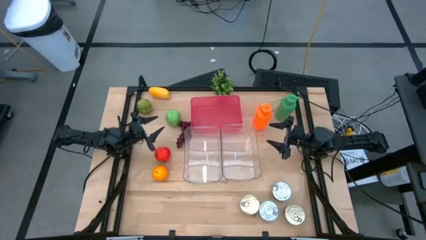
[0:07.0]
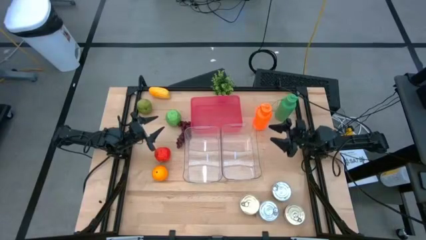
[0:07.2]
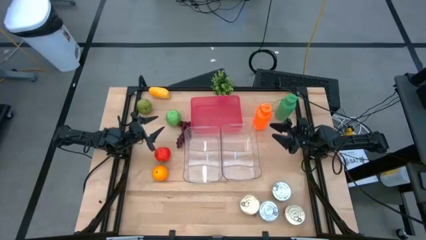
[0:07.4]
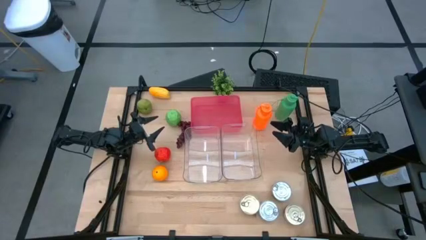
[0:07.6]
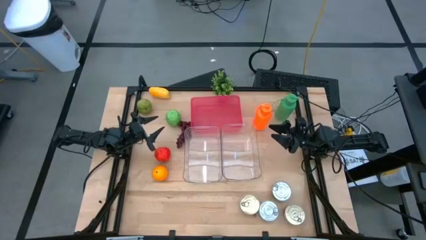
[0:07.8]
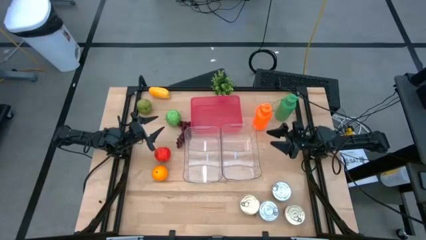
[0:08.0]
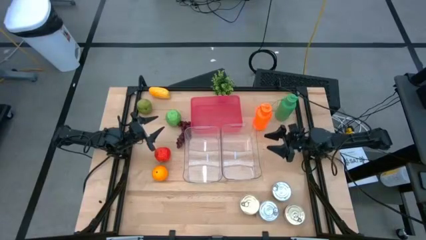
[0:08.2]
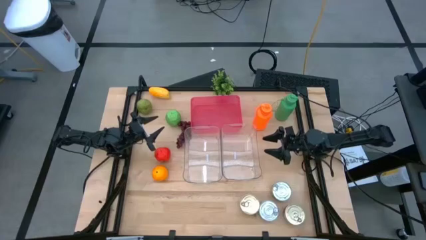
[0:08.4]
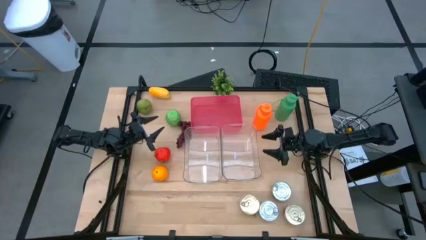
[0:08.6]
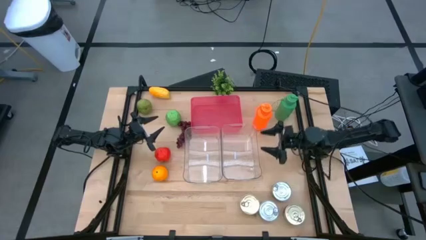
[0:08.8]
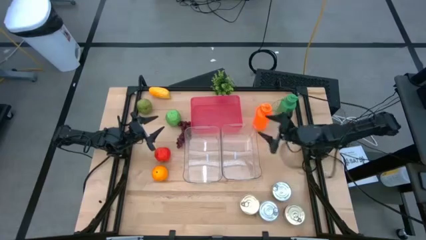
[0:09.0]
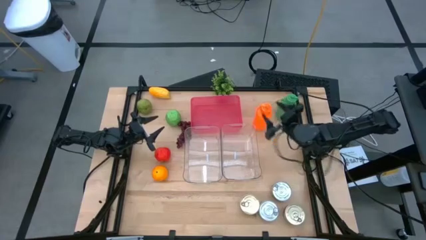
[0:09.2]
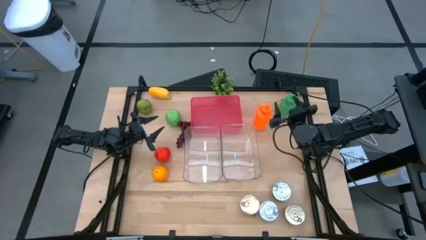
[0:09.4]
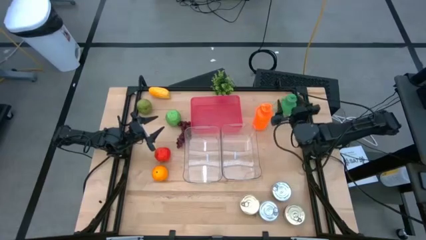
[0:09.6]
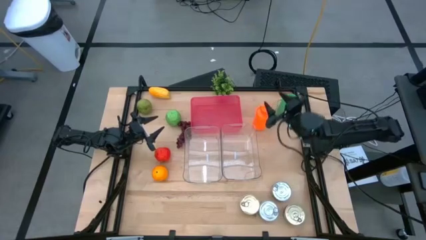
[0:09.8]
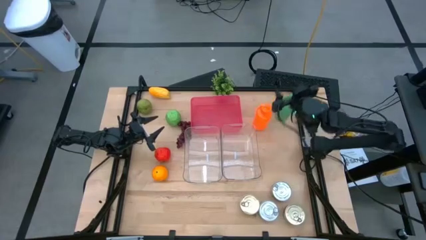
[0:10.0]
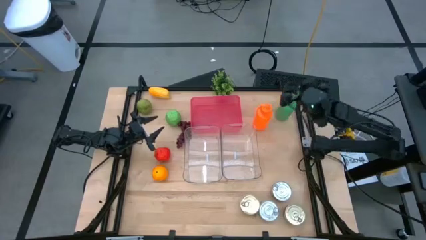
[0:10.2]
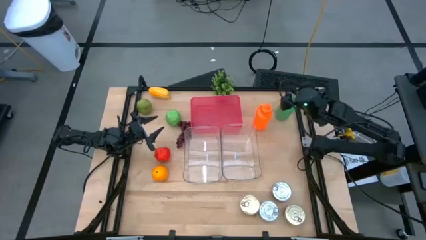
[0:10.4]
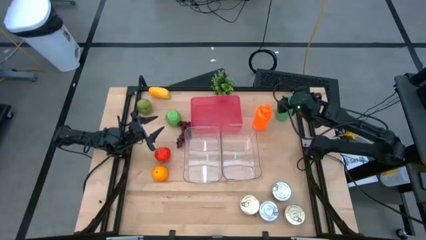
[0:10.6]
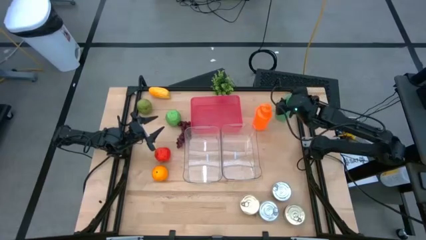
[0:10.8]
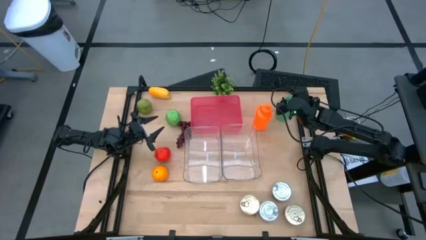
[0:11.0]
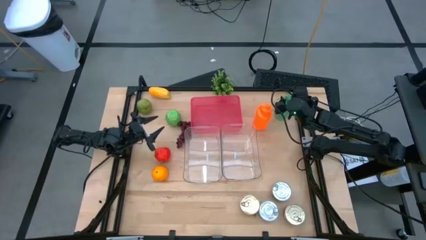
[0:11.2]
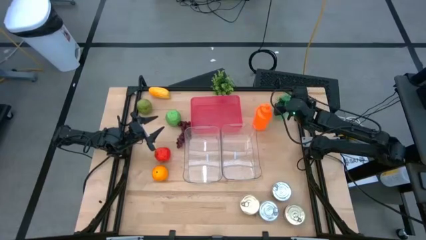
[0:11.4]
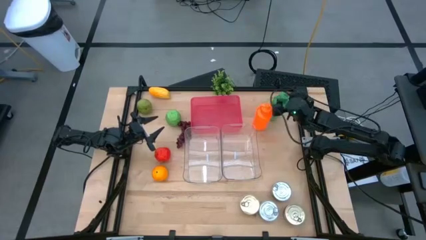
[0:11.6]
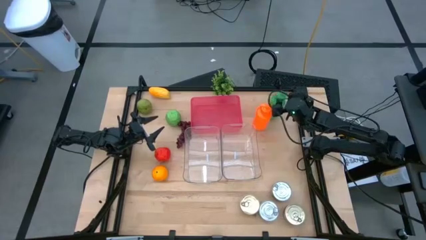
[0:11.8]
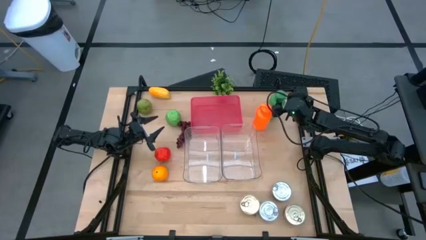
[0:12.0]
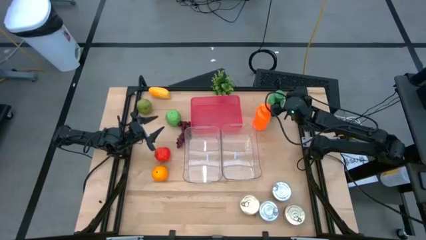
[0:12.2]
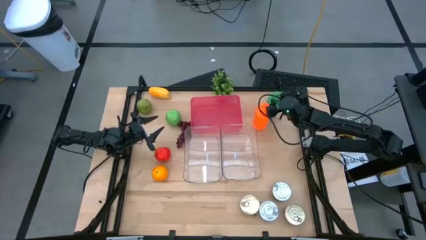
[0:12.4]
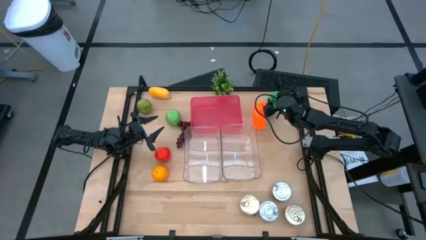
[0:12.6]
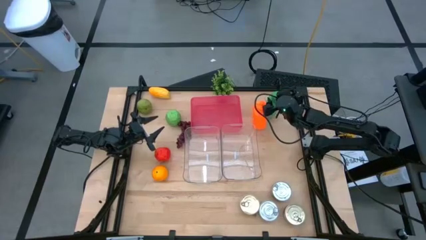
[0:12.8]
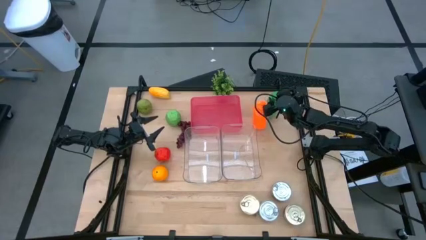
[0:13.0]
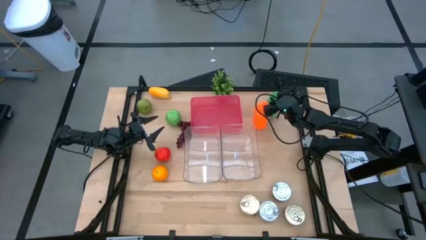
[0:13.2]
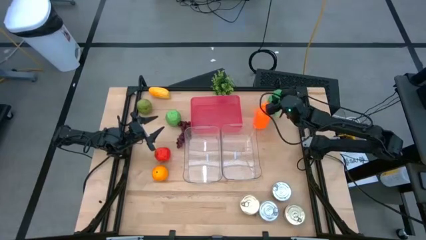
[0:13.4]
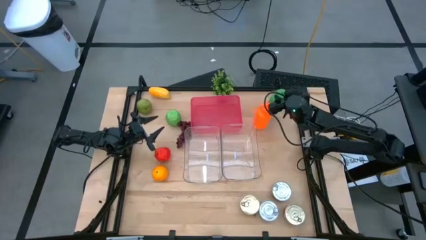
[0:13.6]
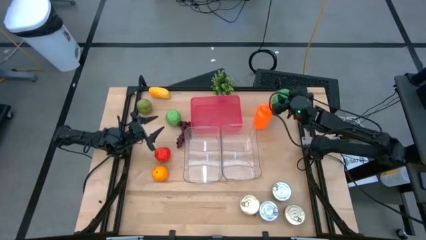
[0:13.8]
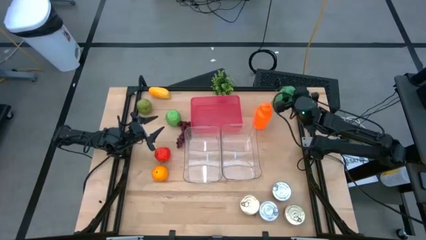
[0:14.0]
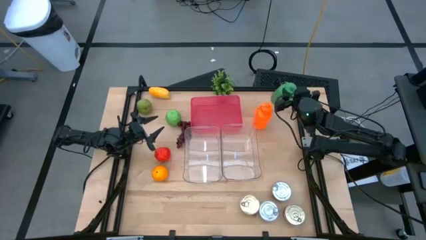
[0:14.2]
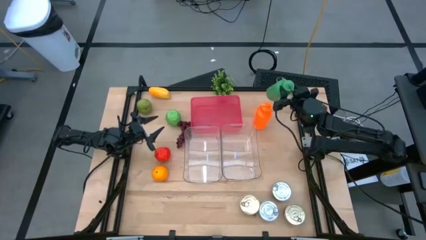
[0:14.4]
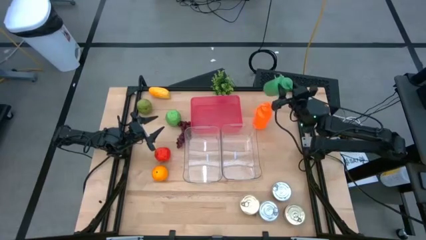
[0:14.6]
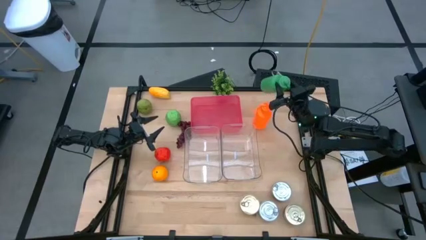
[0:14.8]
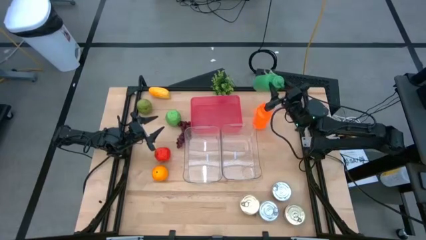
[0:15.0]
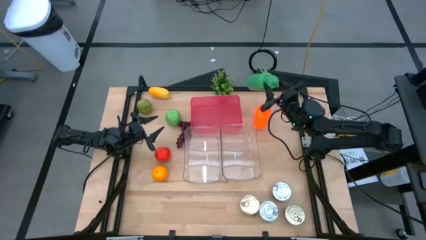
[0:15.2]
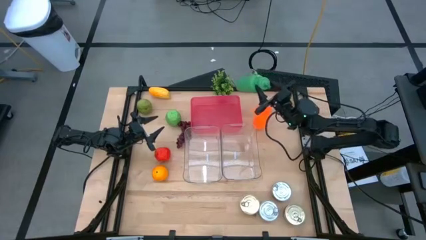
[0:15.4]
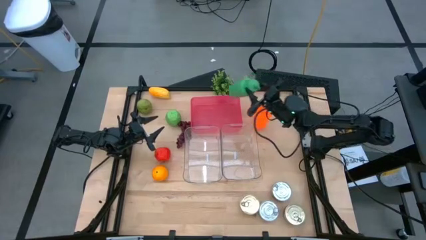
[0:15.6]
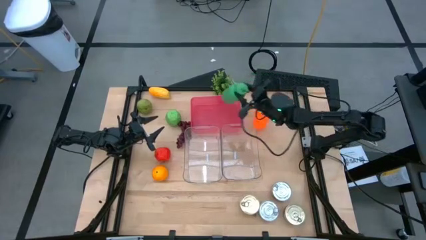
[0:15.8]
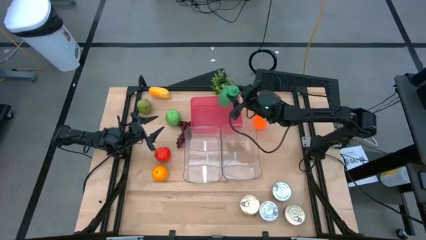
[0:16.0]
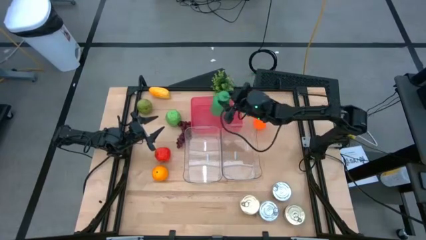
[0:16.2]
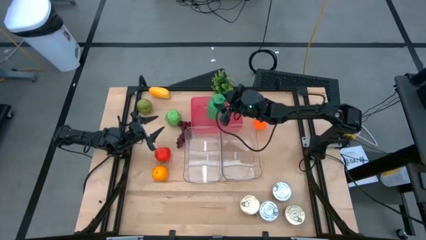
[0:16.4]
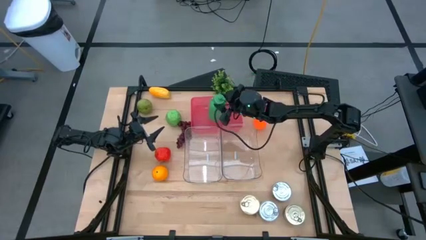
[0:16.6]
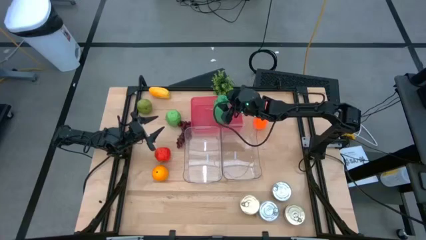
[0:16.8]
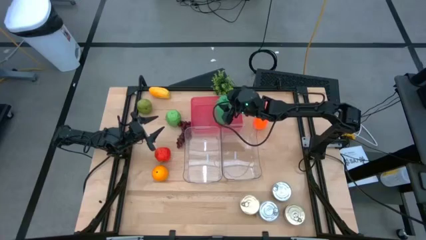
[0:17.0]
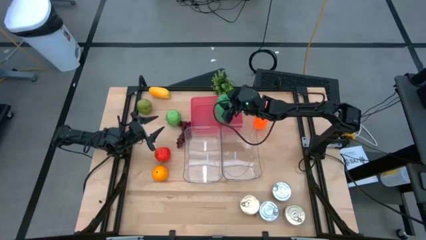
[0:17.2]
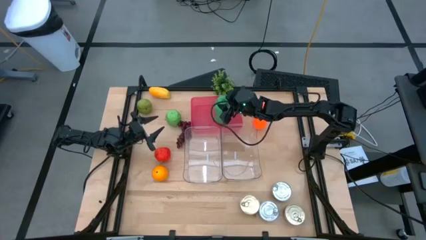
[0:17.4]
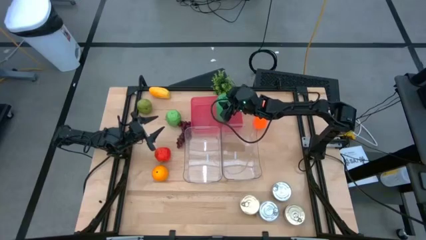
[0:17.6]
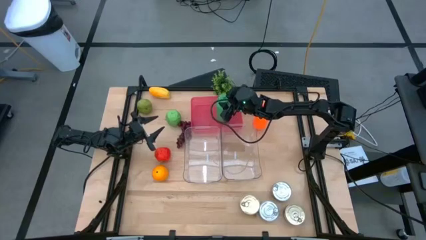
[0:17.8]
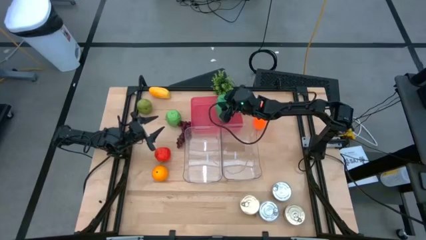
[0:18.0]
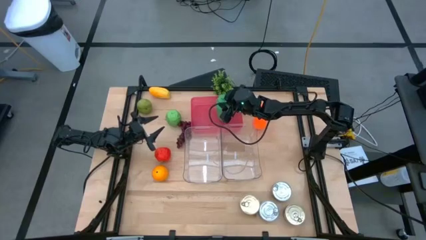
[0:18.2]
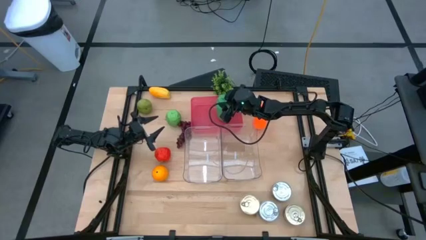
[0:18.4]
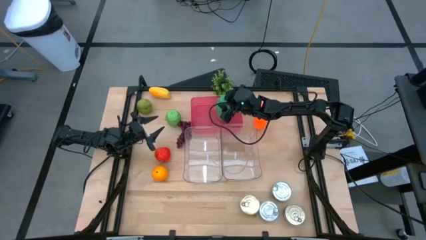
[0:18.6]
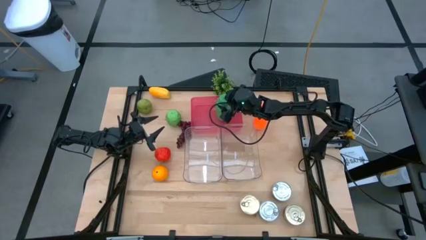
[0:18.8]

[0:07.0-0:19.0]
Task: Pick & Place Food Item
Put the green water bottle into the pink bin

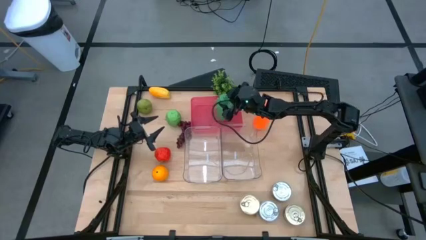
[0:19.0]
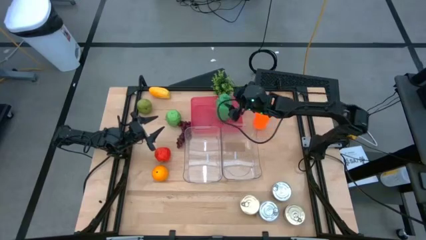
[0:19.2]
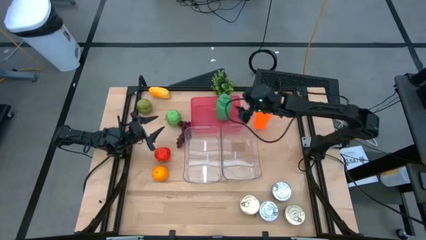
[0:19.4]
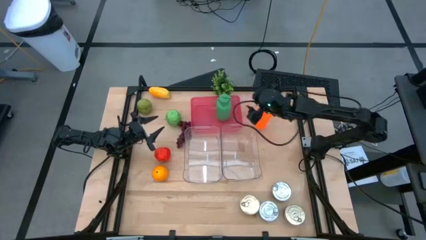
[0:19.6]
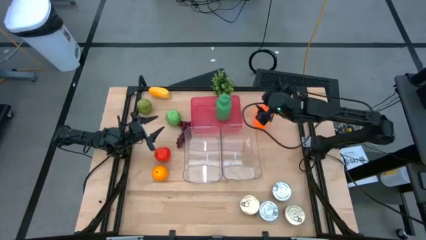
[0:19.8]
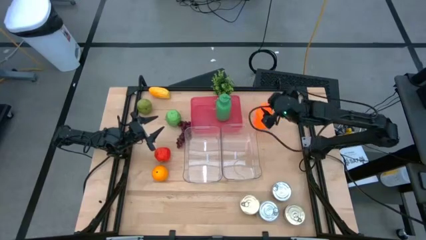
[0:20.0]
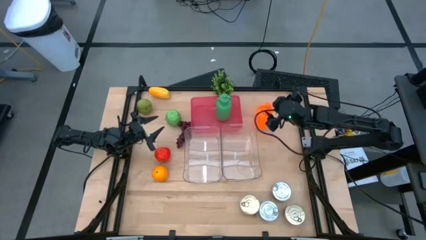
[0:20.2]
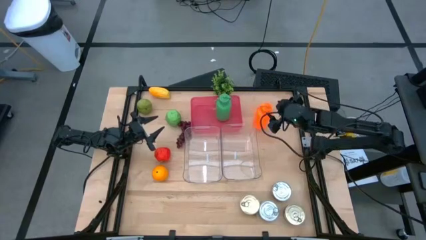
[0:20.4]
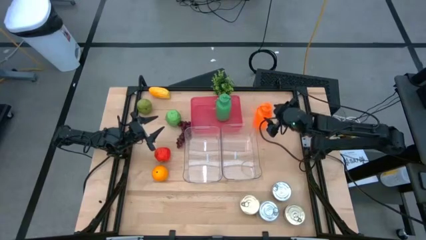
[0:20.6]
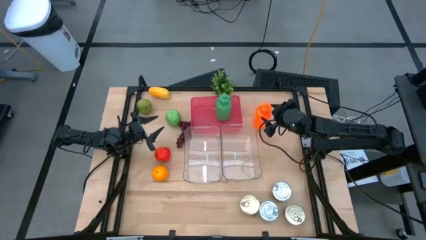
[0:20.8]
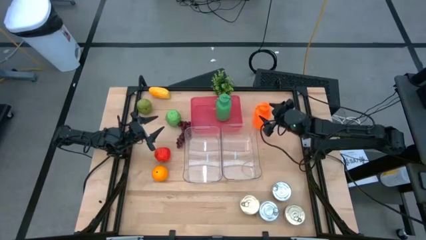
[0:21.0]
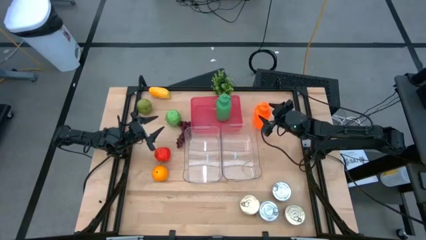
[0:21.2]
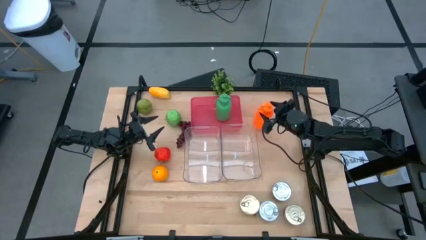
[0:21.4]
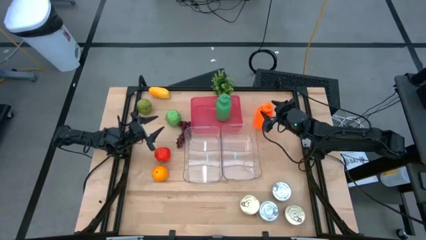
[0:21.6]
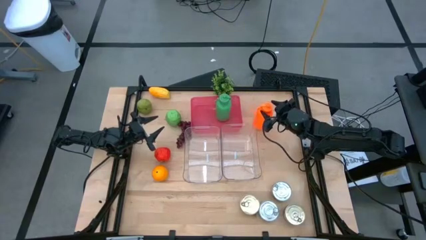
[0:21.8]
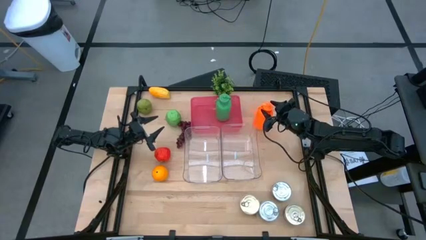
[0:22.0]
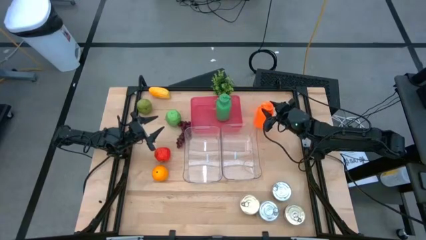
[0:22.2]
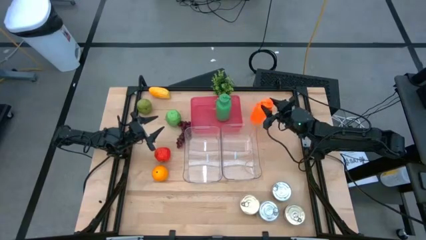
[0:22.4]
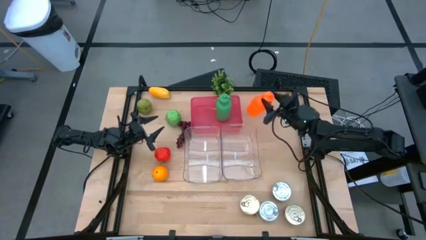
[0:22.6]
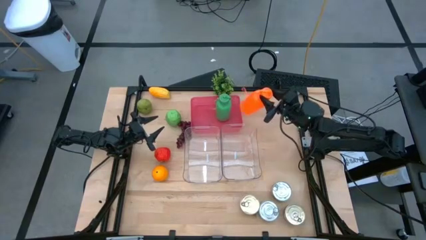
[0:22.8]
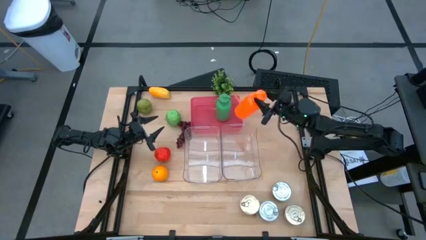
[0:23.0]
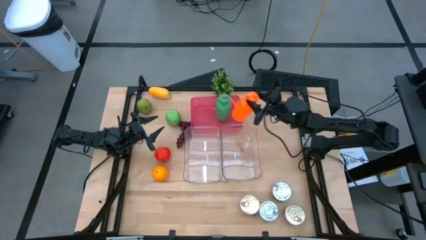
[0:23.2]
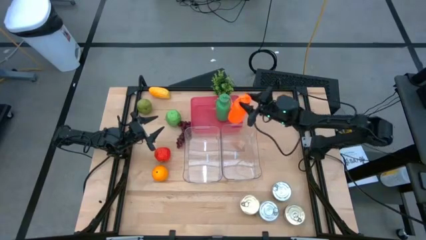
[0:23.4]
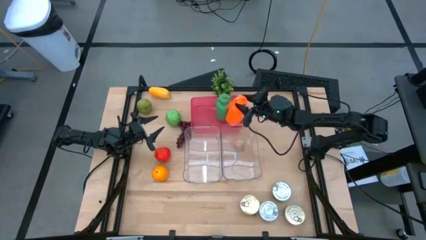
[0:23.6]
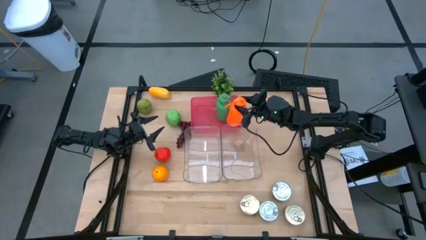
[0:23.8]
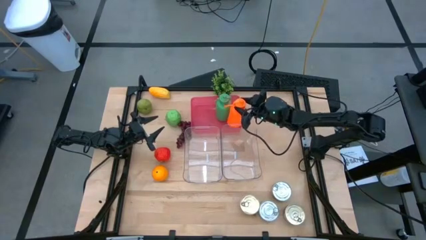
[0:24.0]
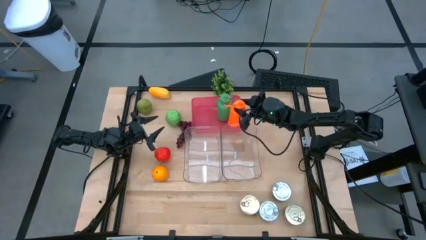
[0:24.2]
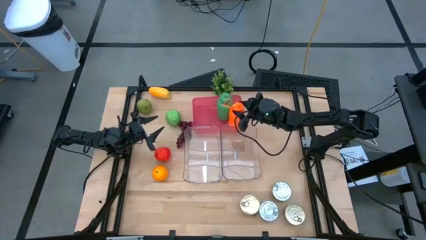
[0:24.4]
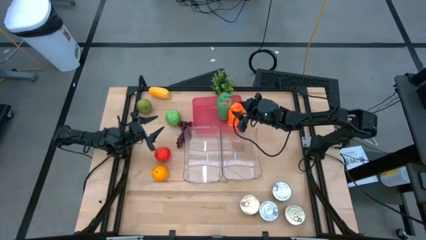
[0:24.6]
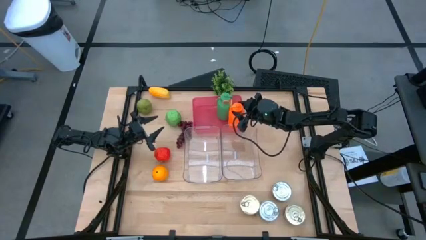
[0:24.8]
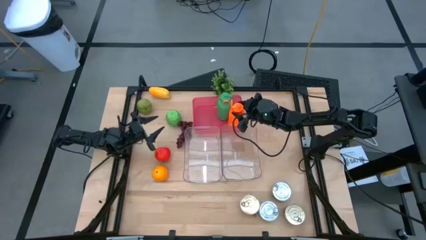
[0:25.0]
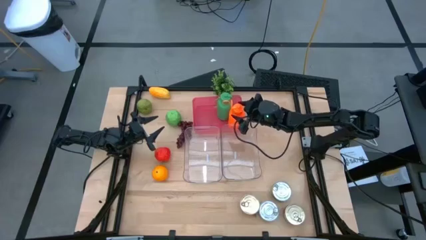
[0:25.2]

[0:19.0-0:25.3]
Put the orange water bottle into the pink bin
